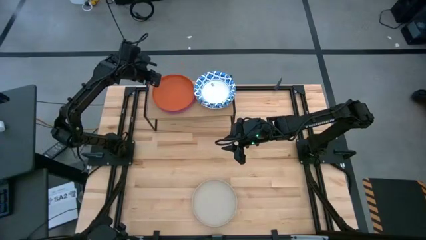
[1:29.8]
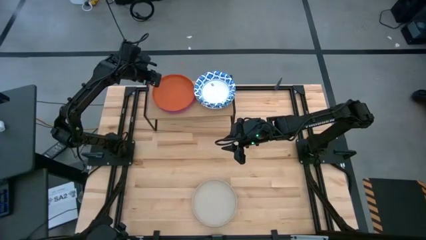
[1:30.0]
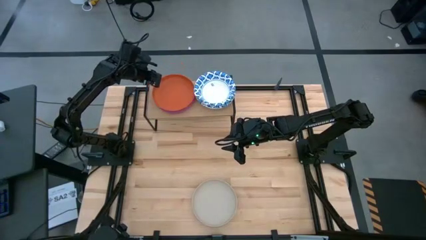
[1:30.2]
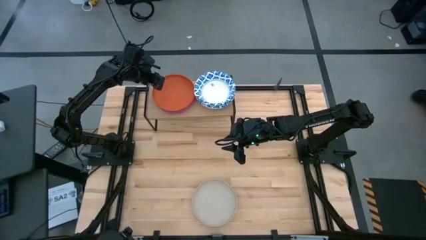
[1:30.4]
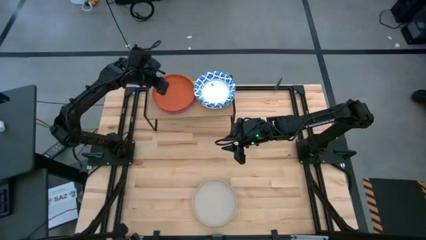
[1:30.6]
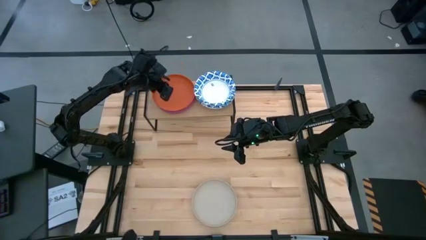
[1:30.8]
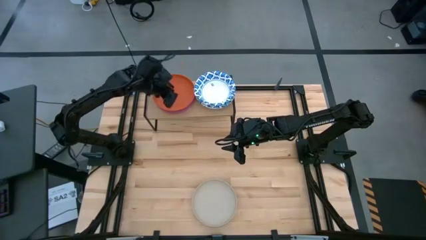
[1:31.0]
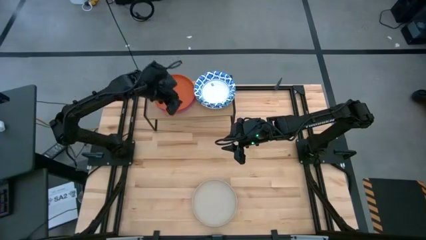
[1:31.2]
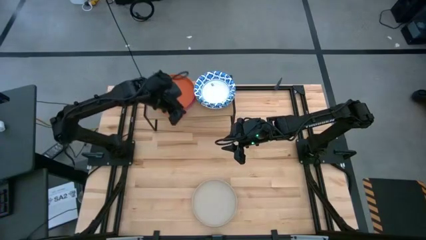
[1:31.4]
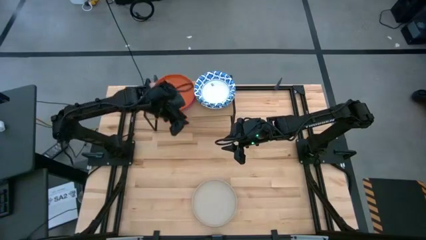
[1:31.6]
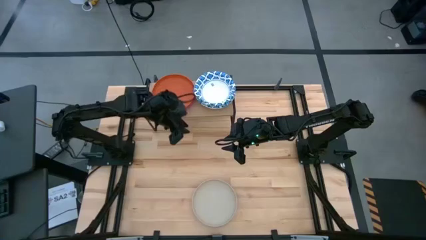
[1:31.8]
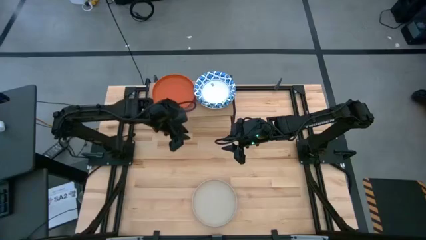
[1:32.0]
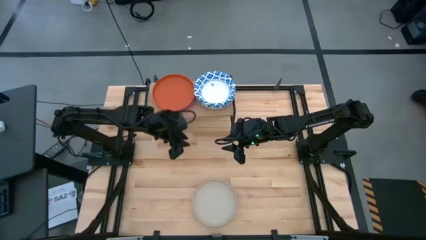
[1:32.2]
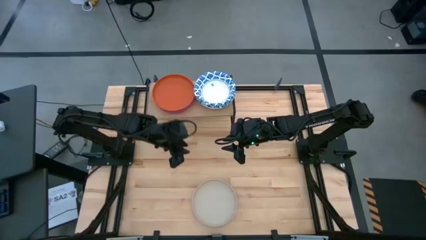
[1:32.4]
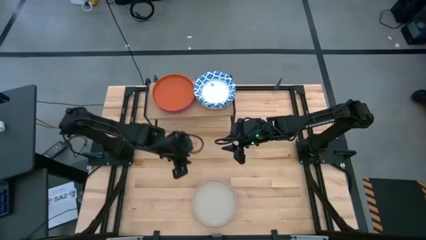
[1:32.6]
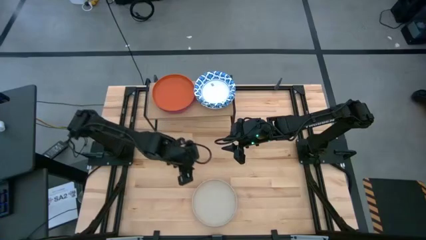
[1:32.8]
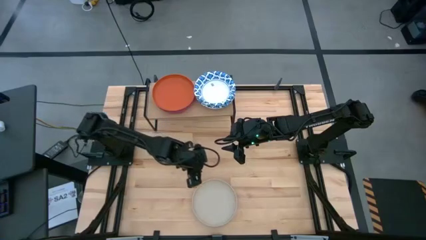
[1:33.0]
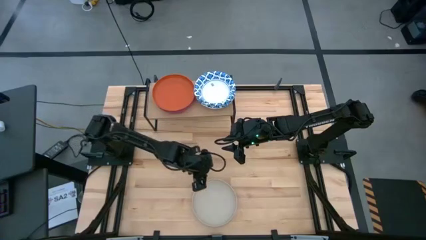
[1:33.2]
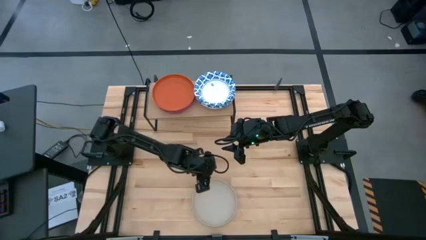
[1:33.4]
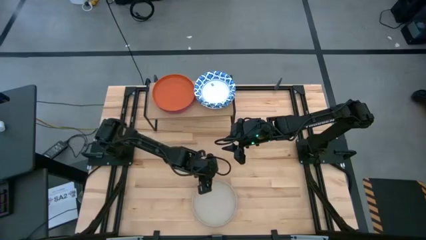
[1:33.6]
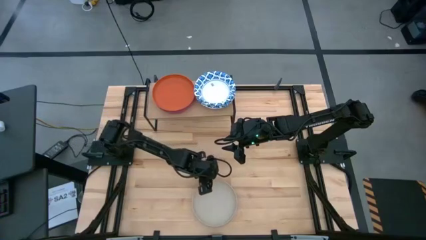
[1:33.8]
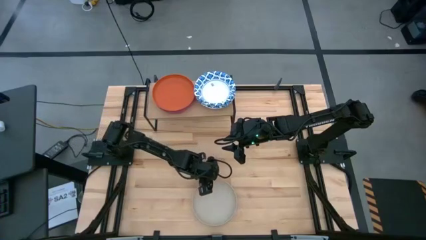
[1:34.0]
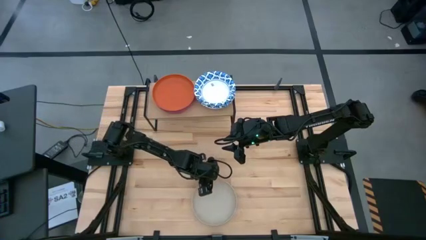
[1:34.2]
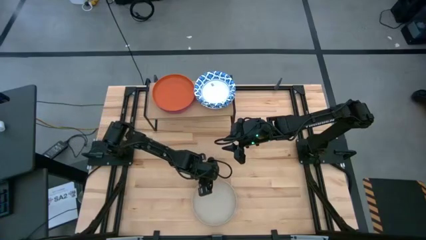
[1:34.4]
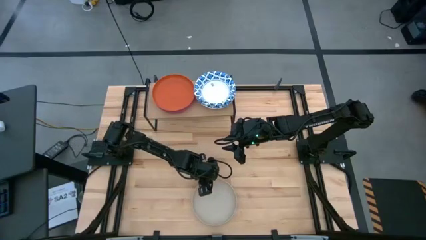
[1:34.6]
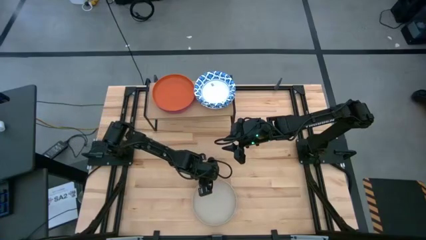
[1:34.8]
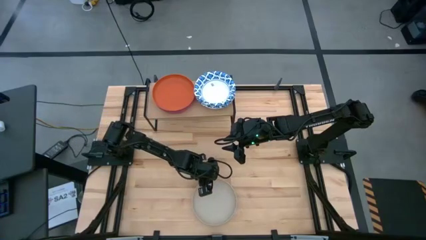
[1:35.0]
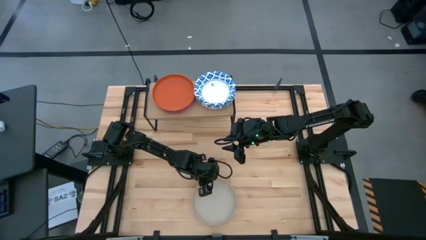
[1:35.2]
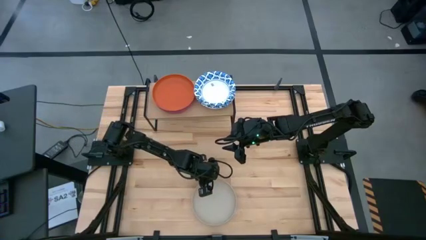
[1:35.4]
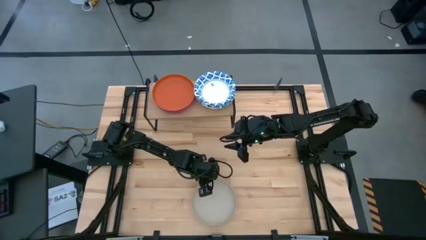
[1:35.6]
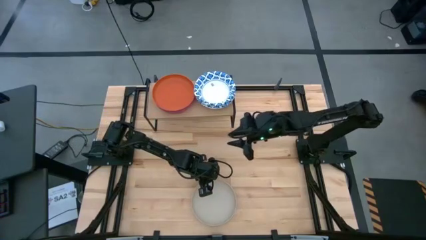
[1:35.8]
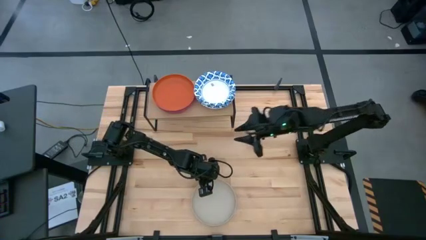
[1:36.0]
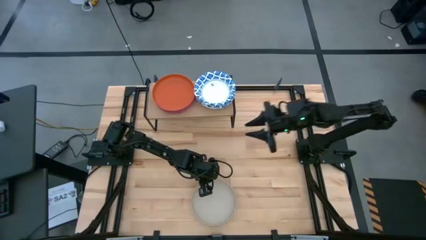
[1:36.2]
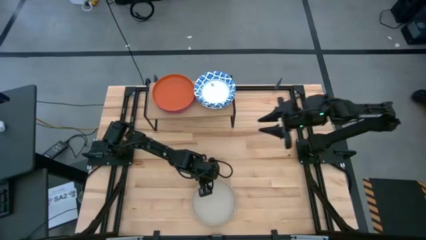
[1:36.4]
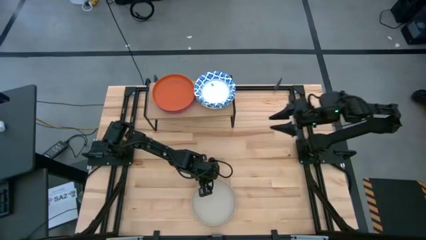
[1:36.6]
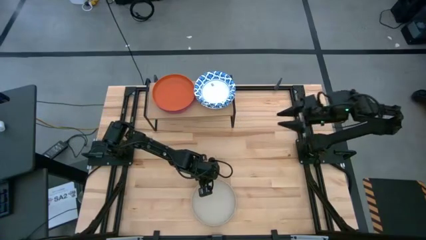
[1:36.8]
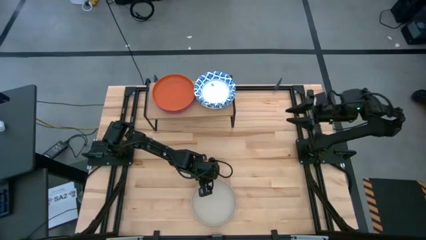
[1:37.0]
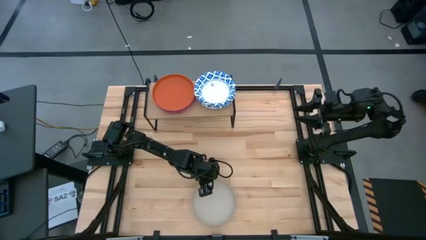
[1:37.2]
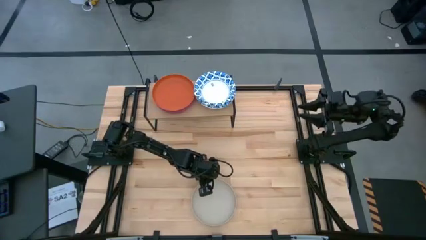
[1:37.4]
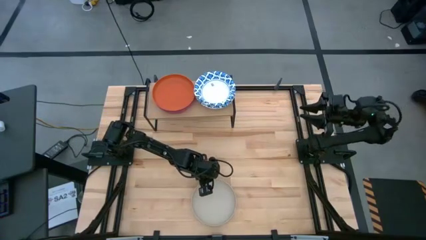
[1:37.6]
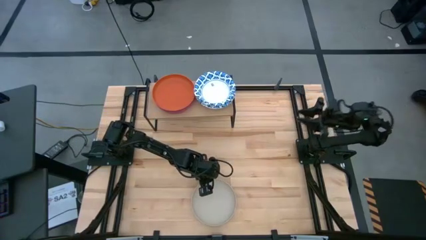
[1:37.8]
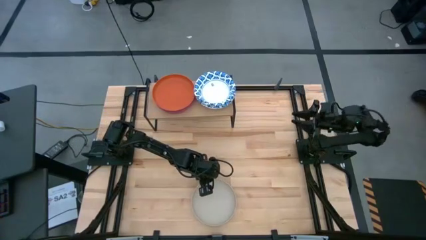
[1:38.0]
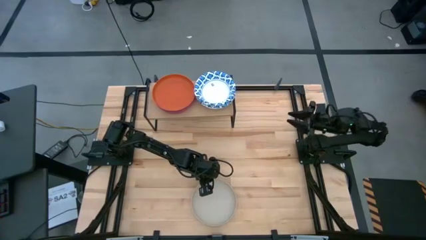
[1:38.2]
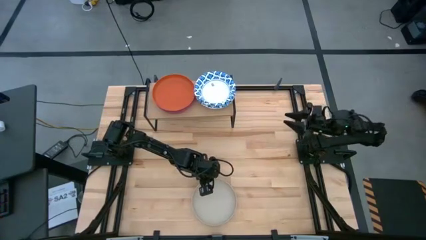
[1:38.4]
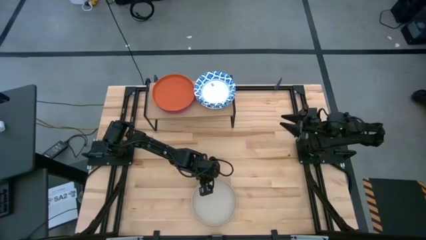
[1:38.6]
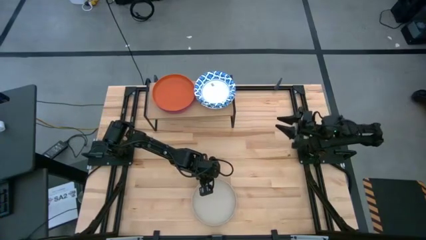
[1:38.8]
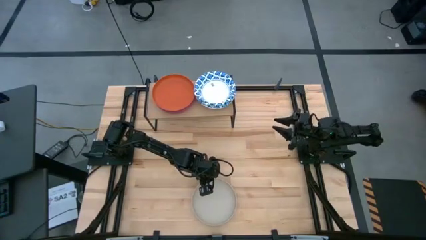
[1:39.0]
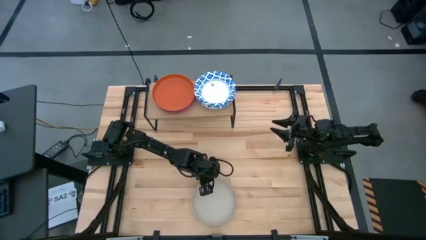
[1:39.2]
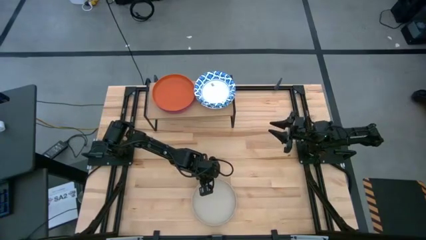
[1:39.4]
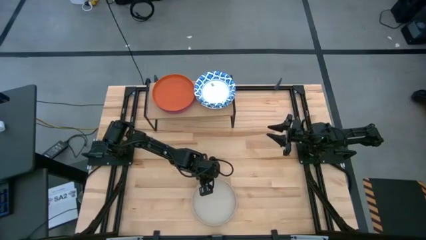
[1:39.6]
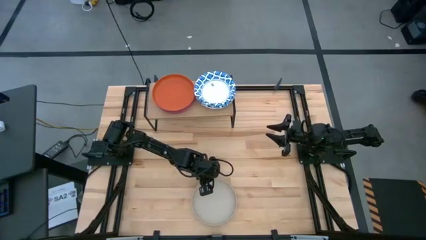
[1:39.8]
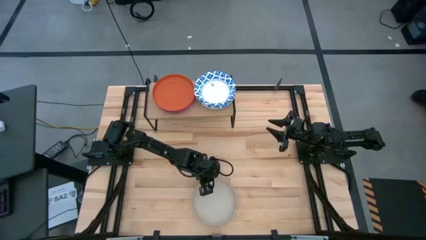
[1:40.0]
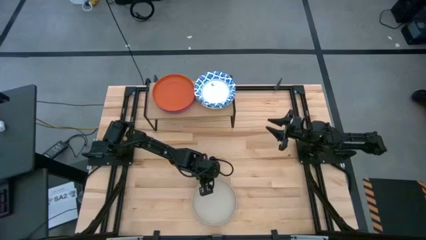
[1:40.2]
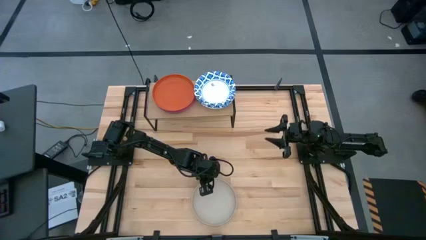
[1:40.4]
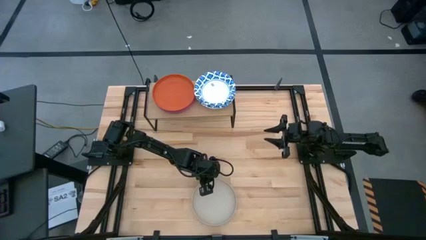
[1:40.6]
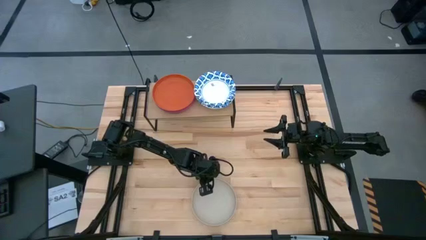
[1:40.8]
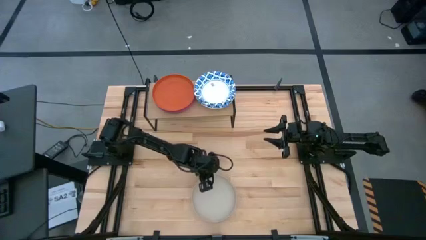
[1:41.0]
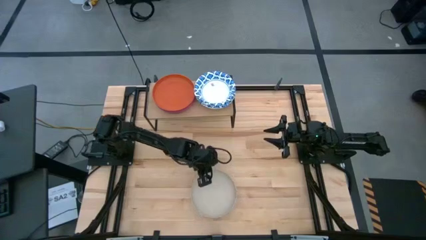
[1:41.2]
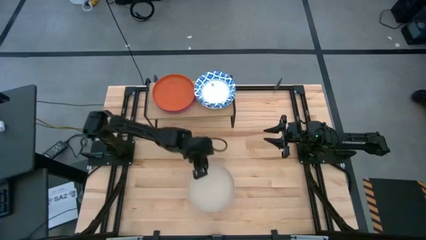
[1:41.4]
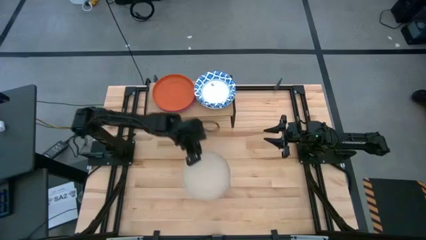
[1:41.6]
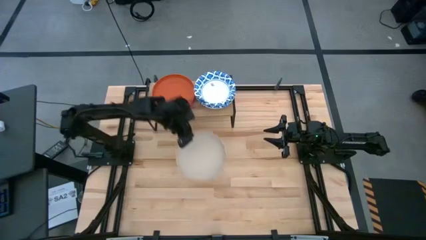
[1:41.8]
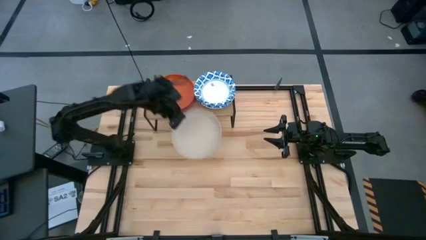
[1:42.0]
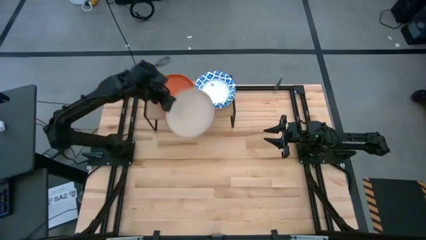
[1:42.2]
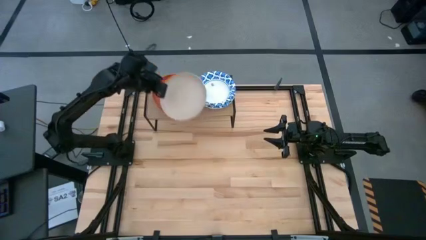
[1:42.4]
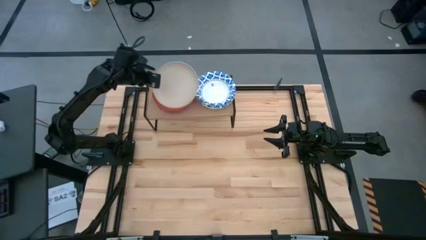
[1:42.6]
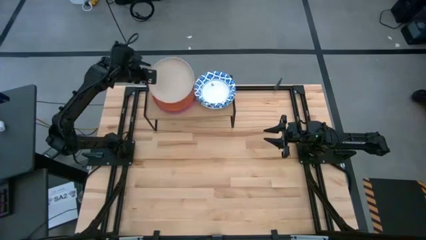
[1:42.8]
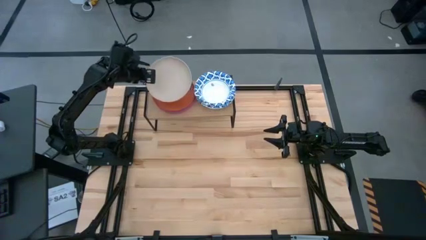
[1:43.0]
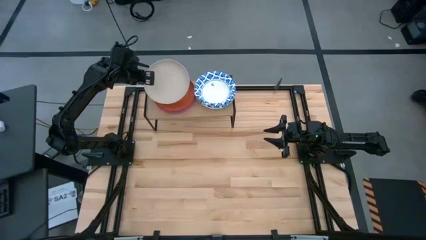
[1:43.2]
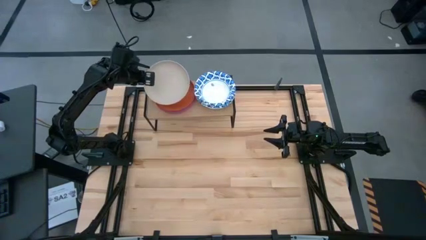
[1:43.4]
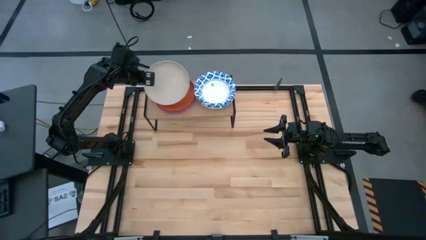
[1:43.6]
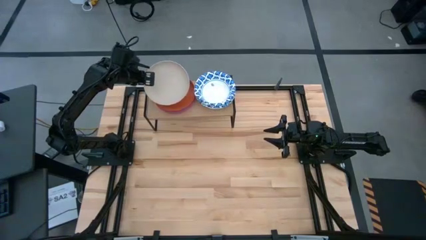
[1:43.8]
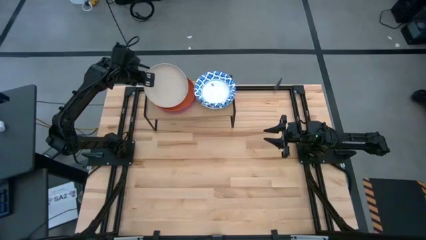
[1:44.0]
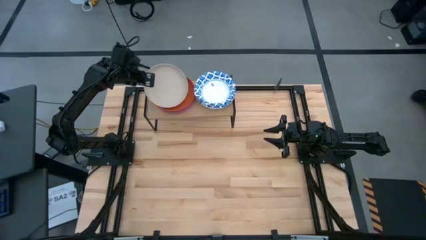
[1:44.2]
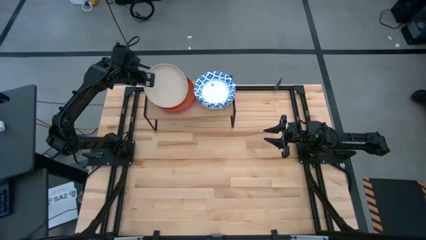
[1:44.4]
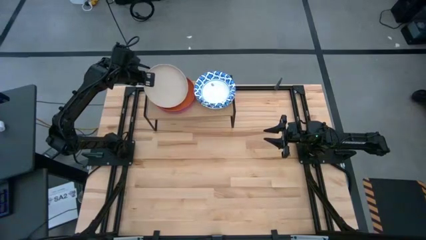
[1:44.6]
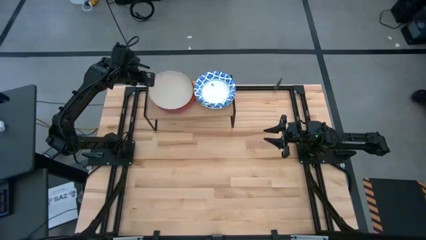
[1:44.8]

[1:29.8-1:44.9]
Task: Place and stack plates onto a shelf
Stack the brown plate on top of the orange plate on the shelf

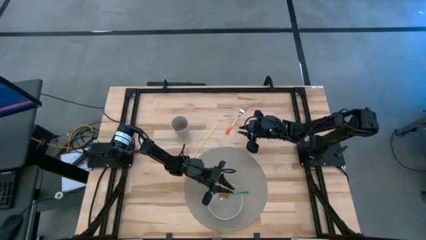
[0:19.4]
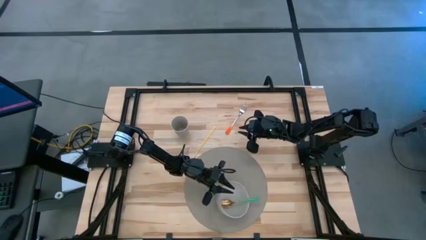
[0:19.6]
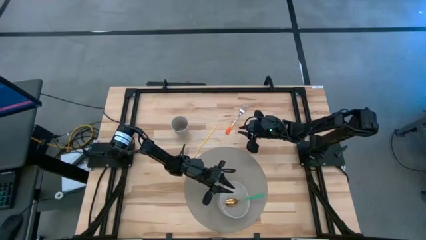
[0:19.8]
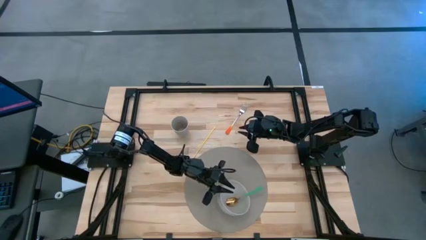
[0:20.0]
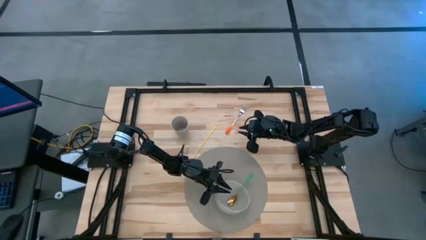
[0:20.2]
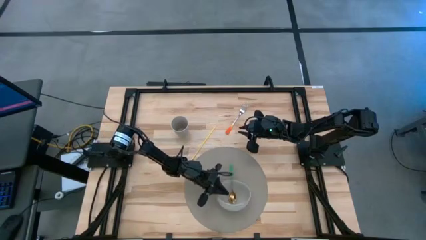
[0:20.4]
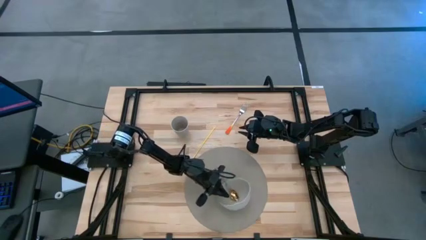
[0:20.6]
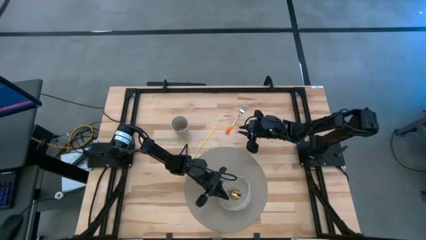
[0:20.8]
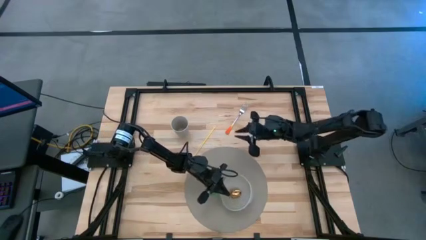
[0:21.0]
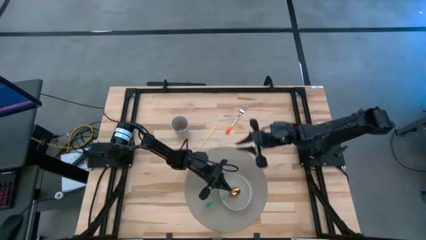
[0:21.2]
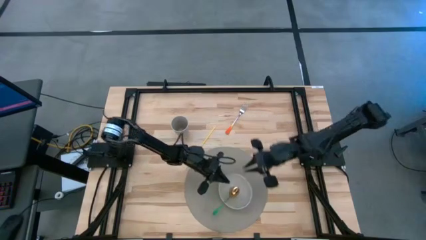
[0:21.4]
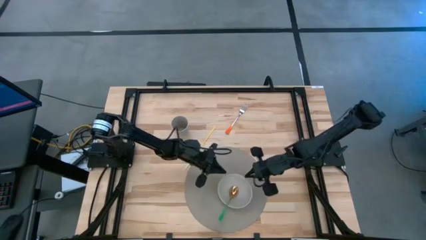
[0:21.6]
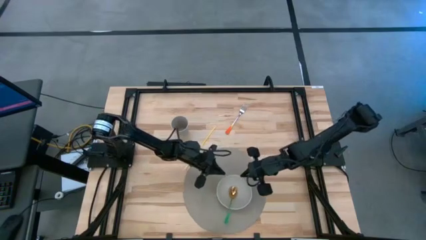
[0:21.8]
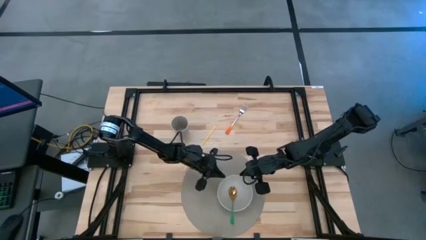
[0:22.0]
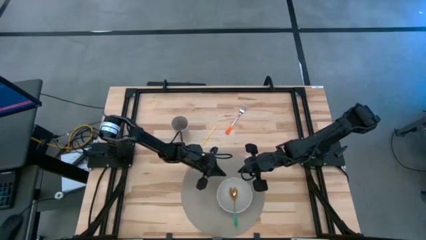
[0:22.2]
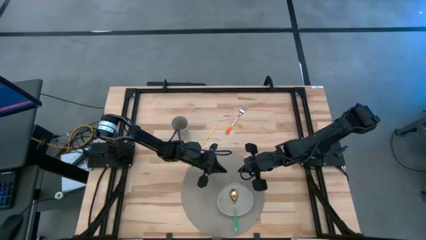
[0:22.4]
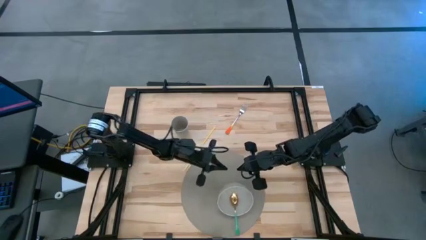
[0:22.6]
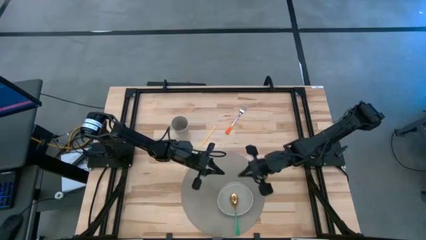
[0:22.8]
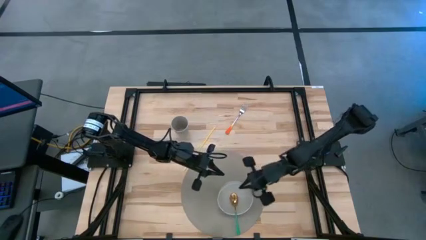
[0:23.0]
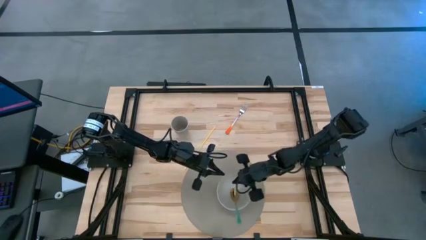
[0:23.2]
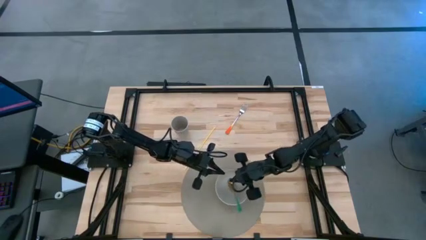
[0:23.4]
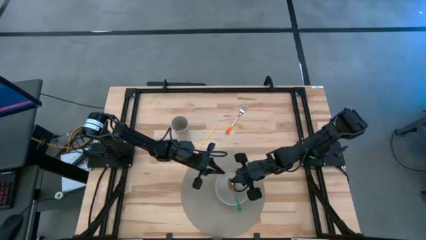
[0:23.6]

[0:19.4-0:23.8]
Task: Pick & Place Utensil
Adjust the white bowl on the placemat
